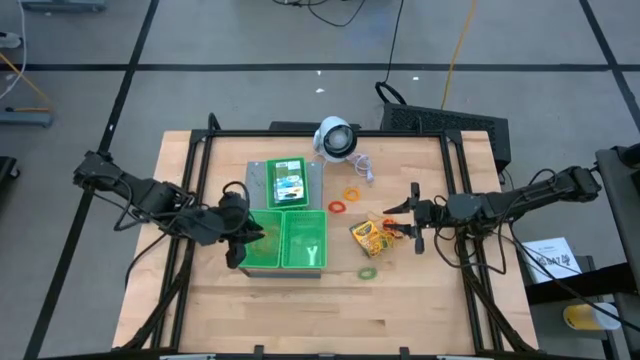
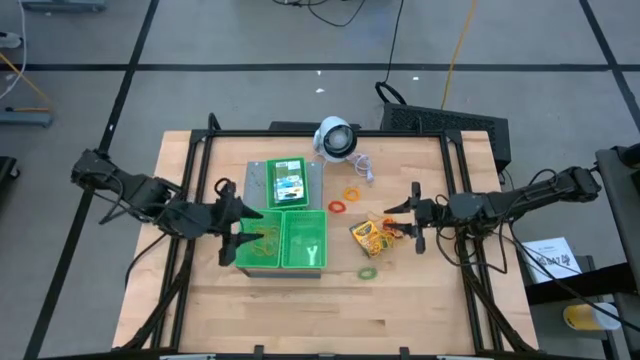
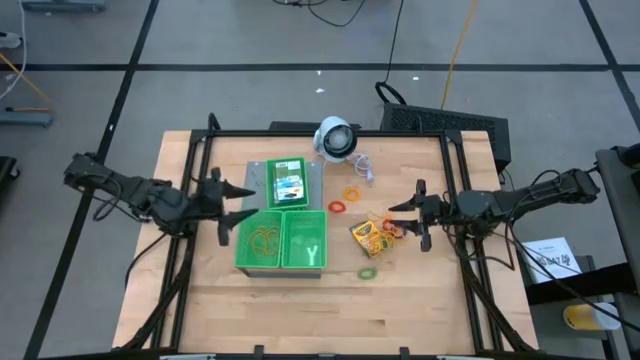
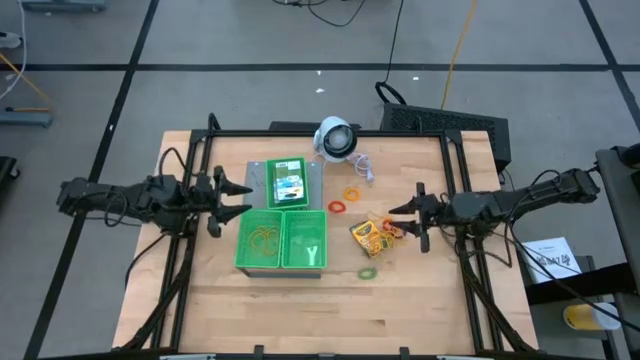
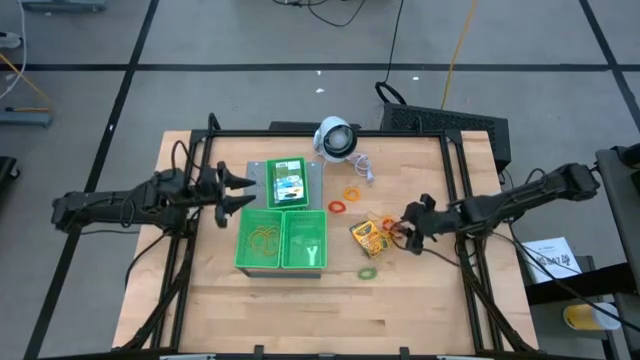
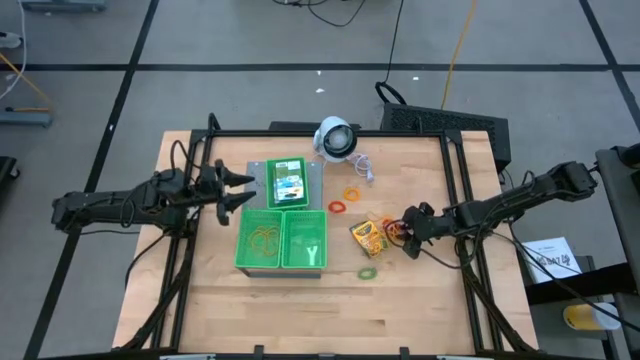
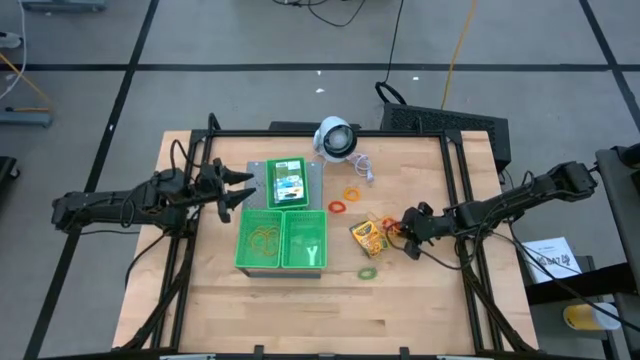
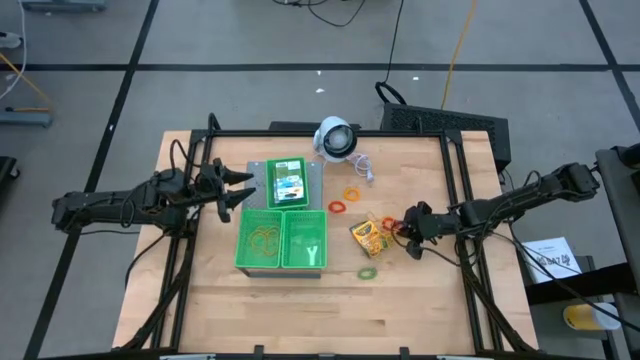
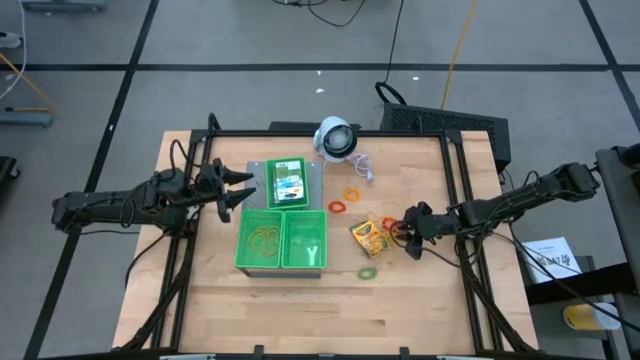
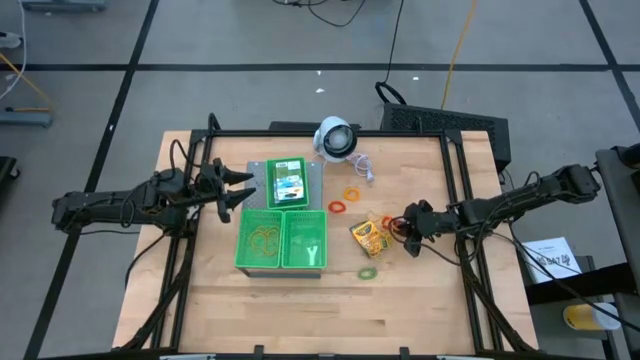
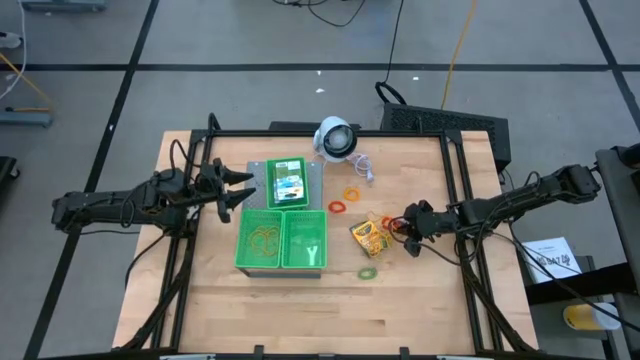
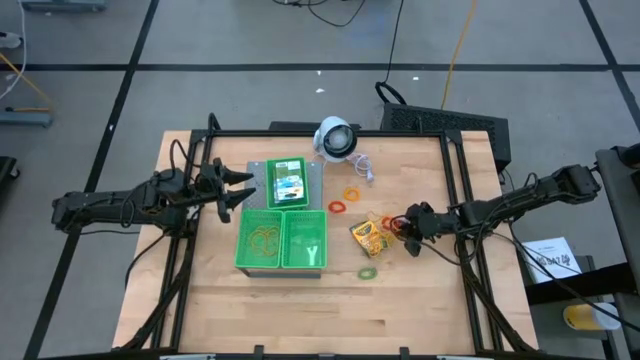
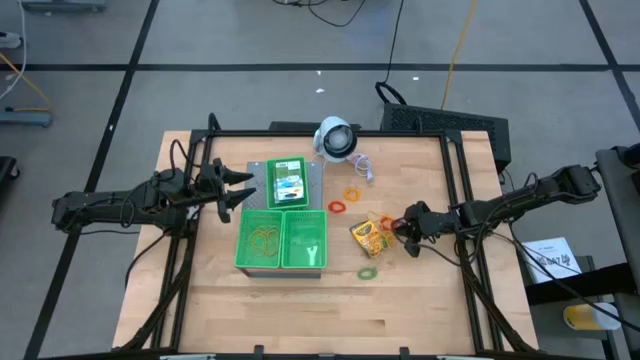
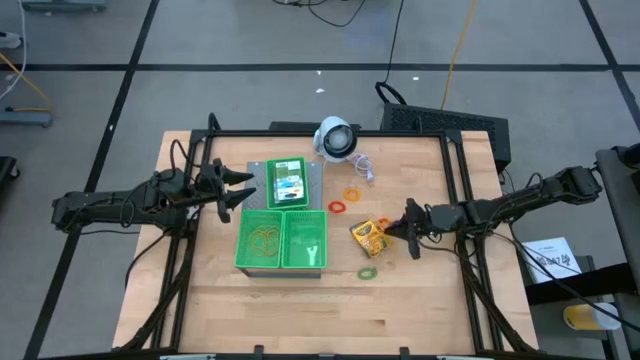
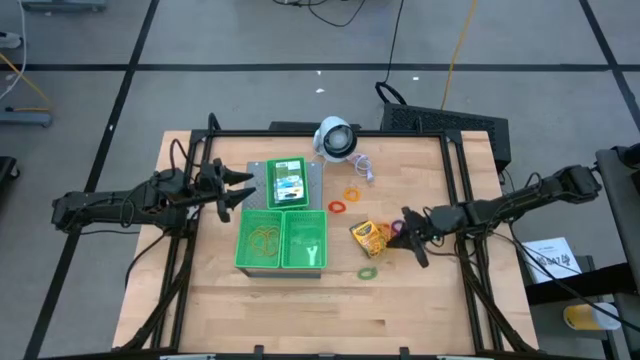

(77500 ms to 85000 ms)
Task: Pick & Place Office Desk Supplies
Put the yellow rubber band into the bottom left green basket on the shelf

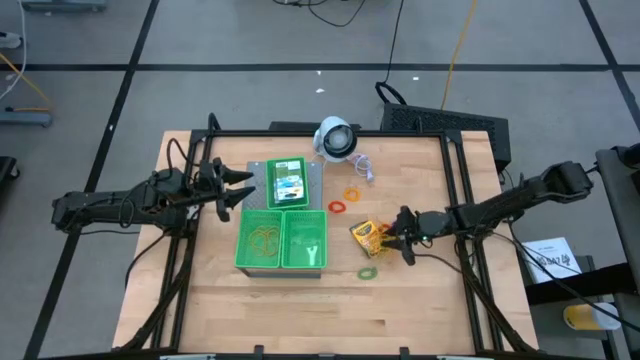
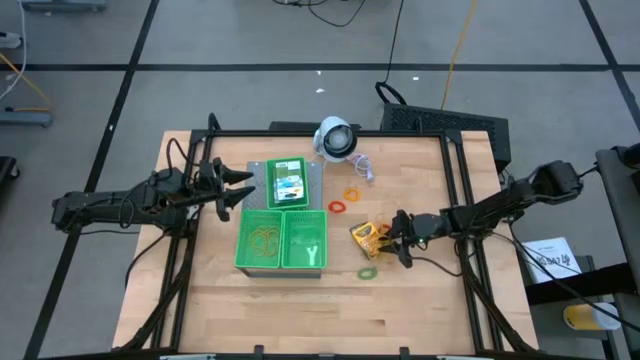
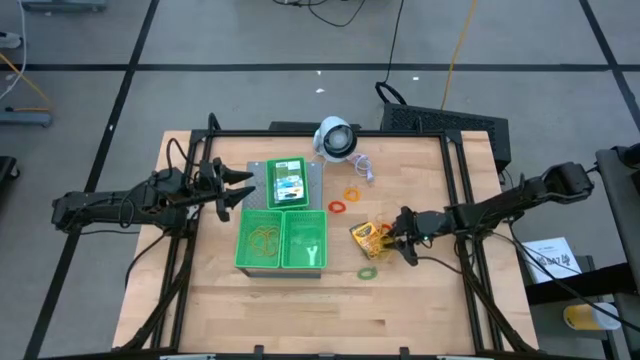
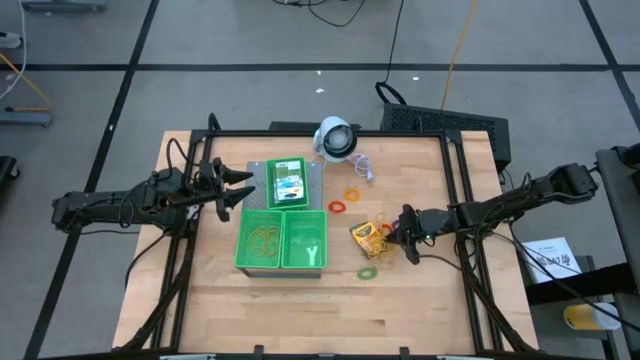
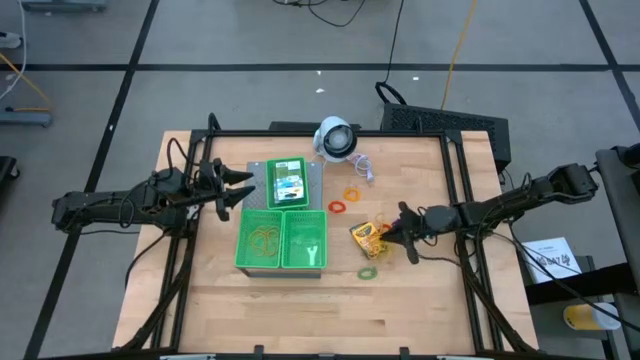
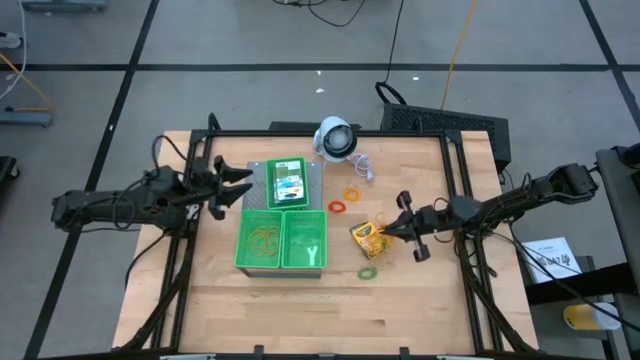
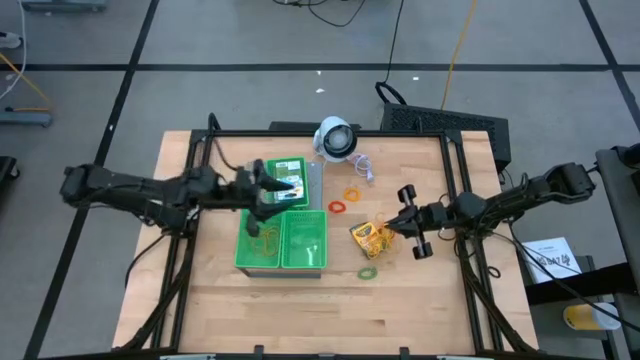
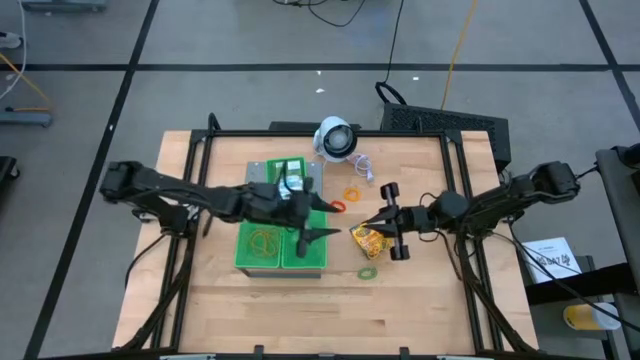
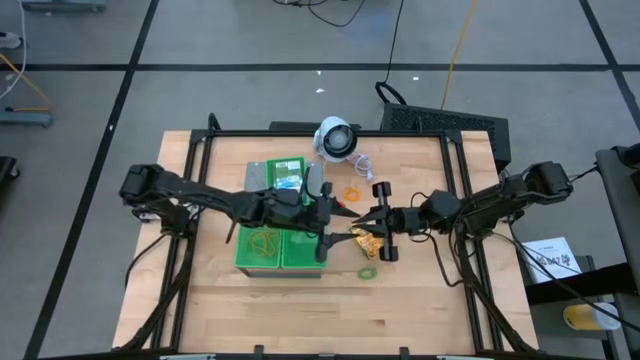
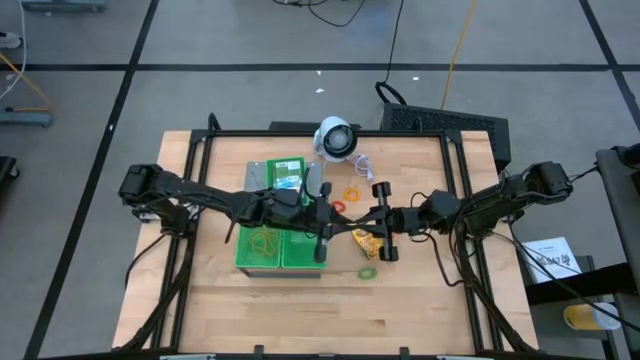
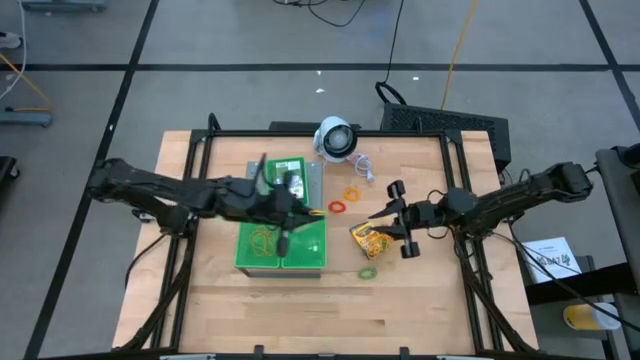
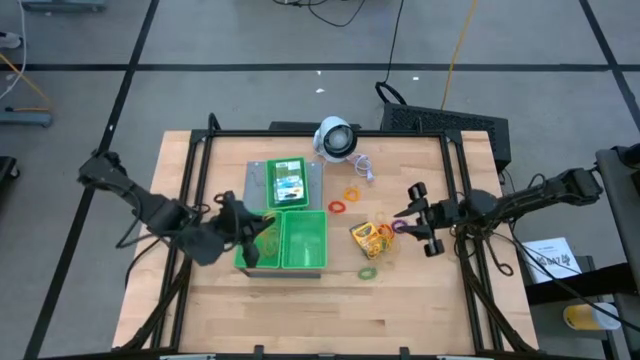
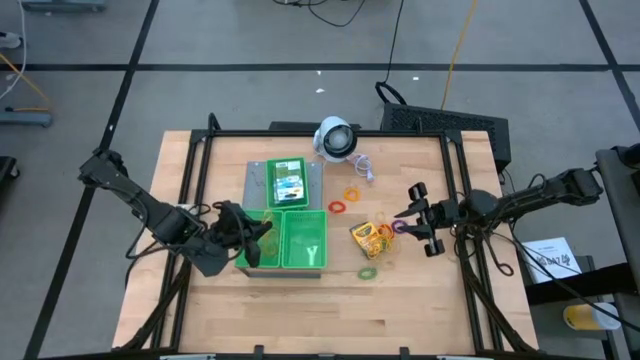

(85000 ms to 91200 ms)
Put the yellow rubber band into the bottom left green basket on the shelf

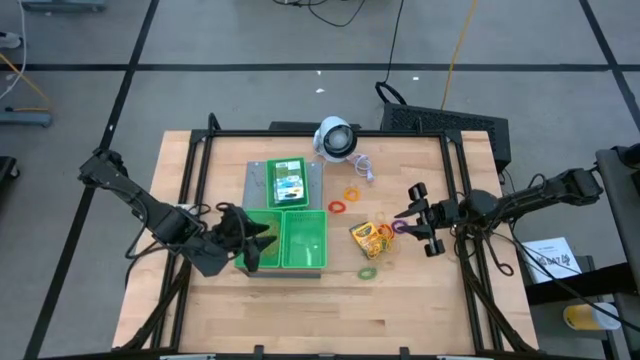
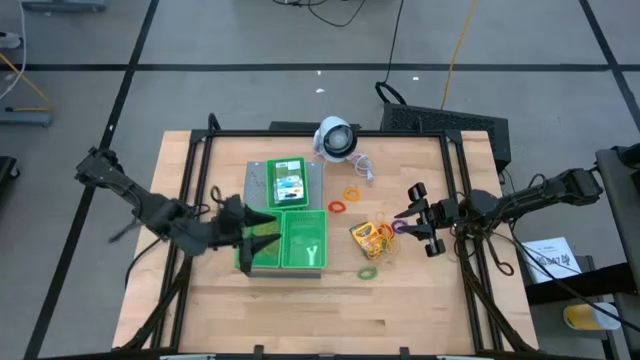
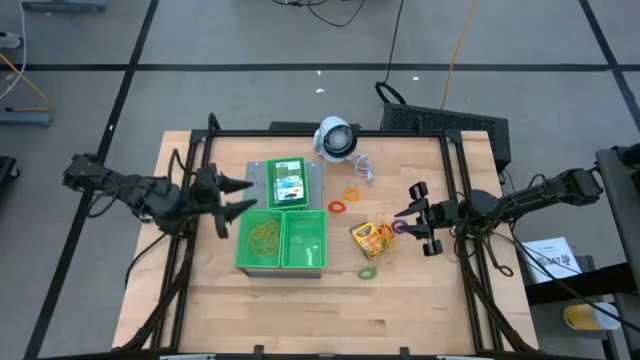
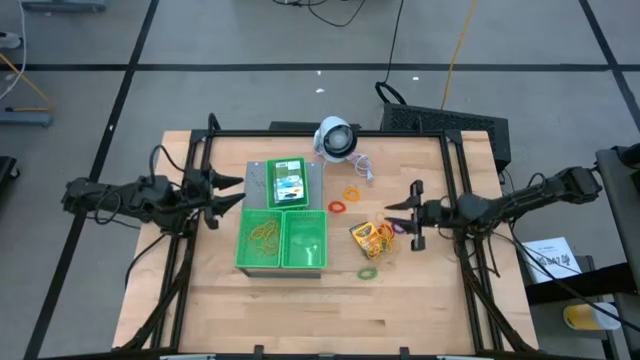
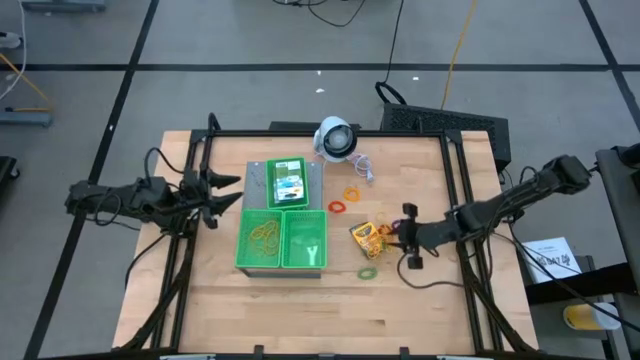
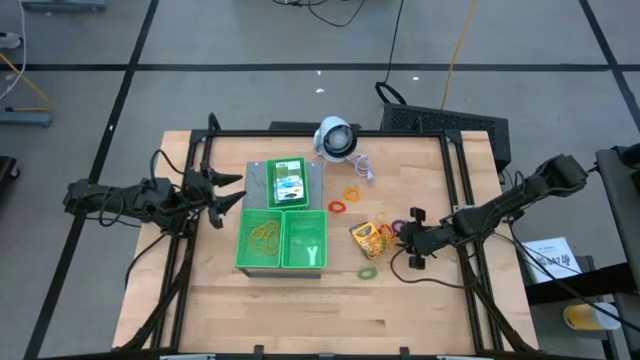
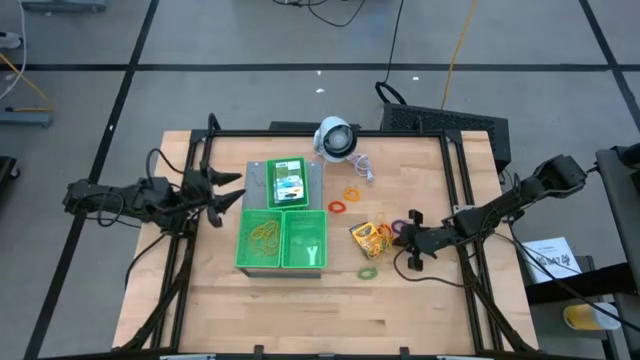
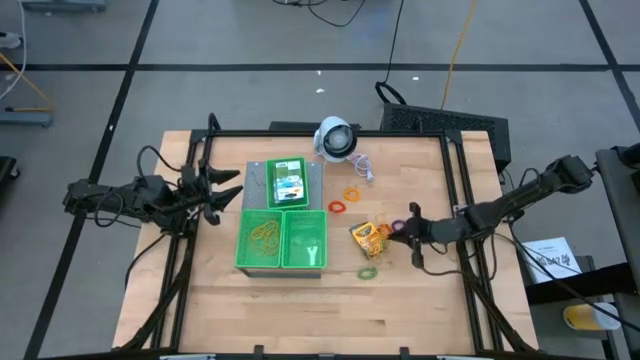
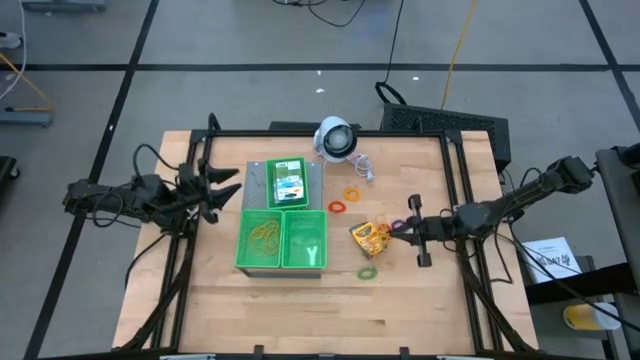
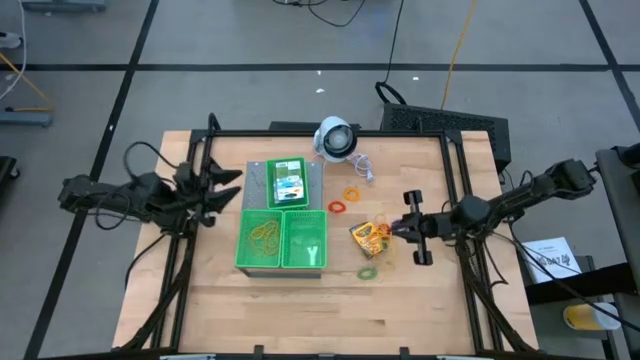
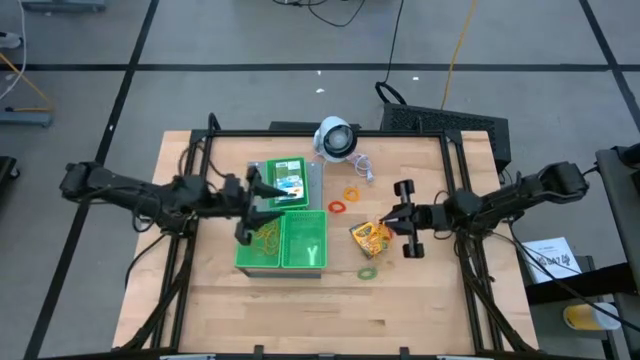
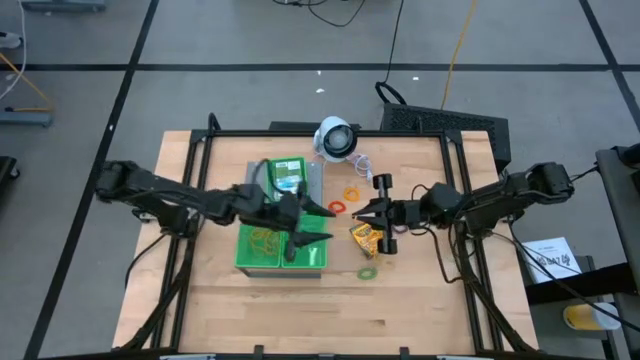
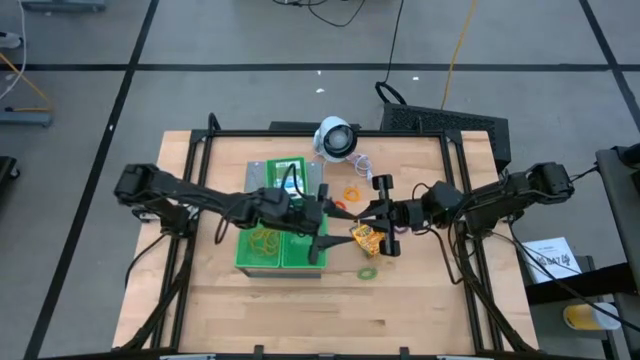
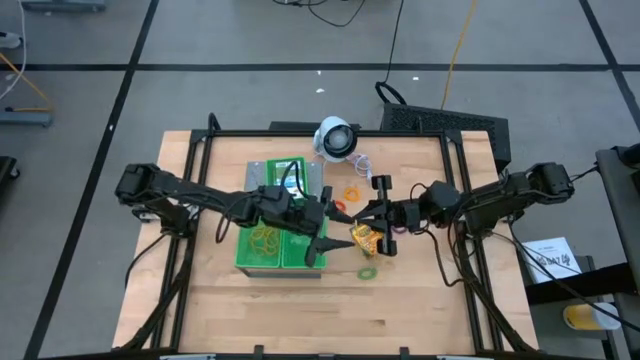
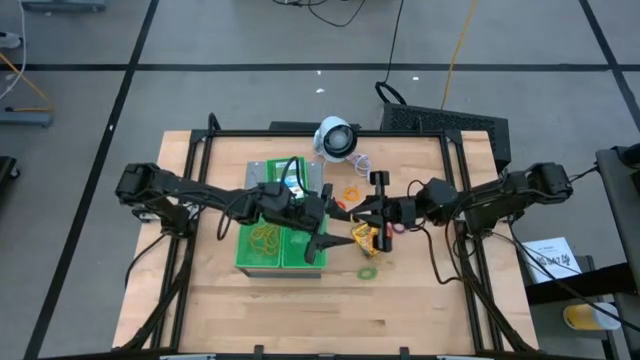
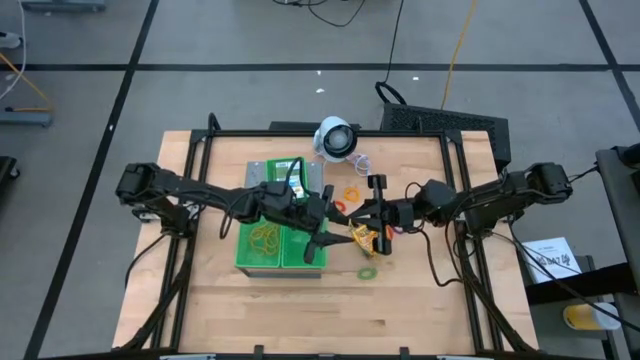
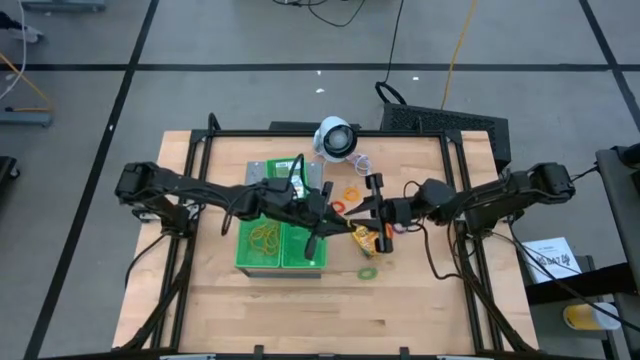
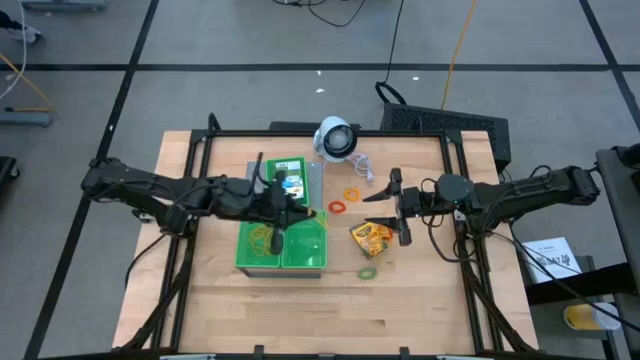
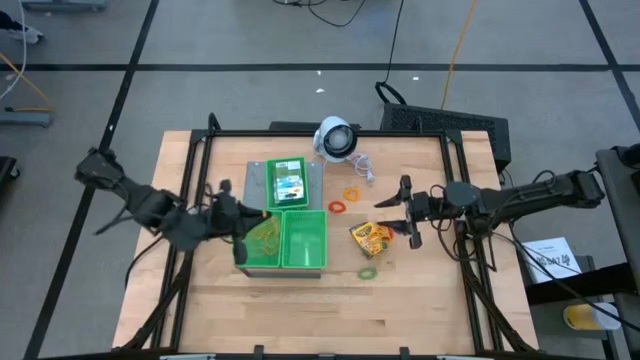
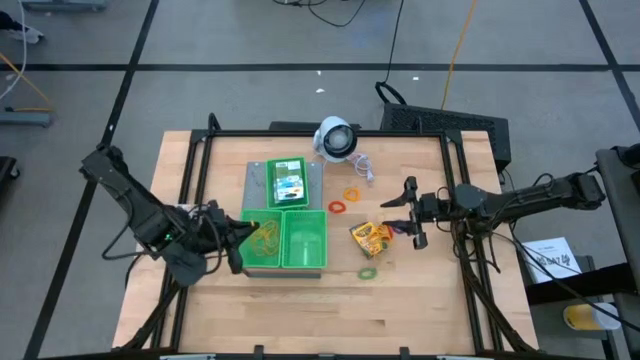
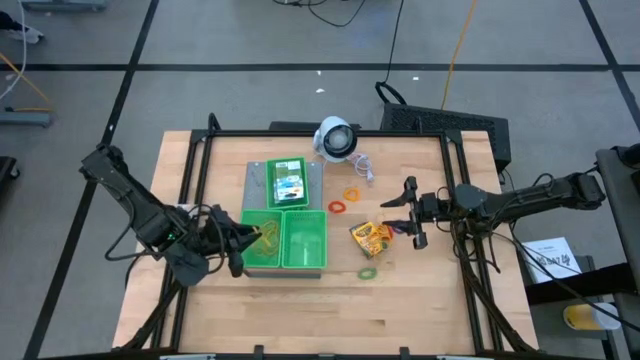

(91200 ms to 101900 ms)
Put the yellow rubber band into the bottom left green basket on the shelf
